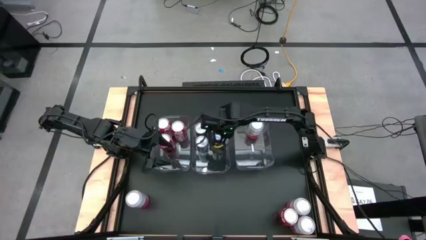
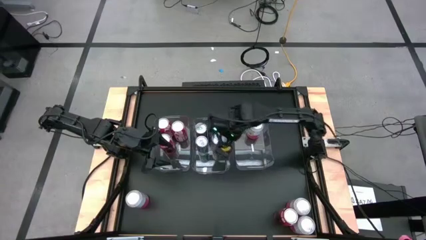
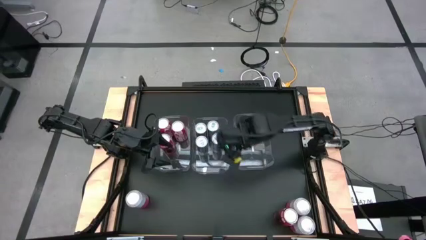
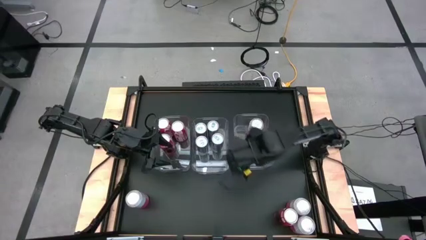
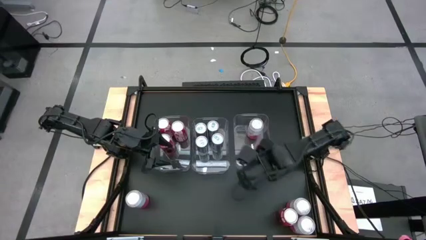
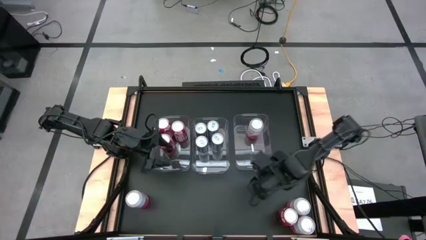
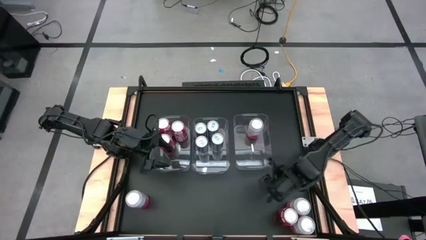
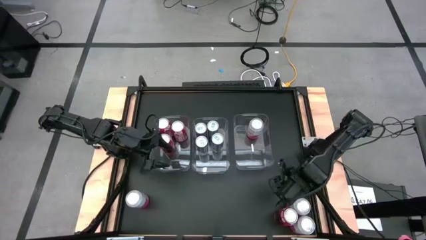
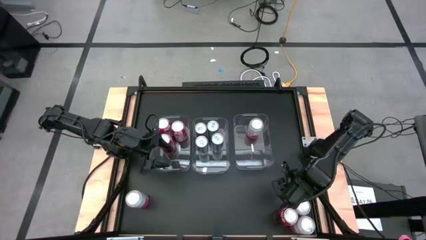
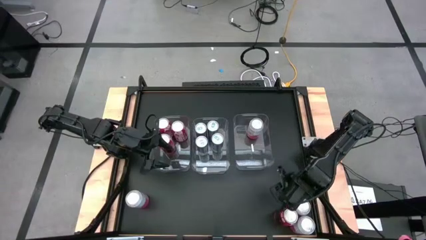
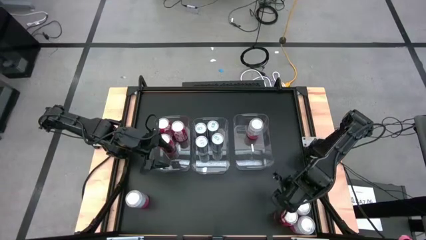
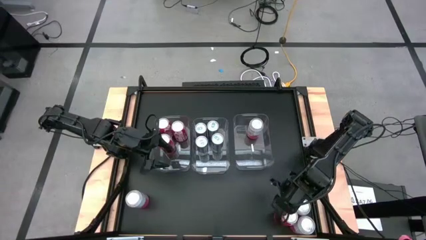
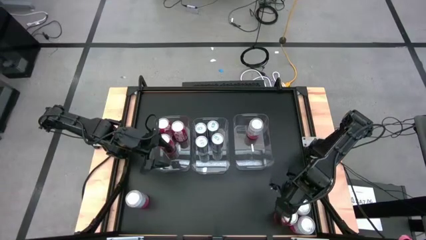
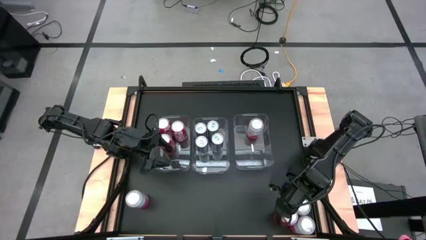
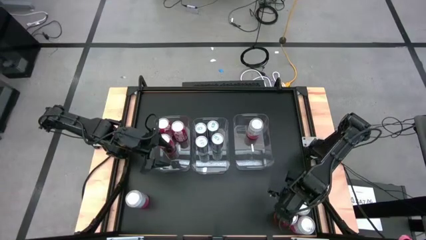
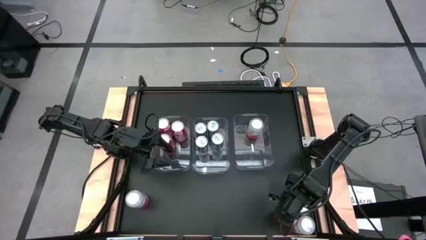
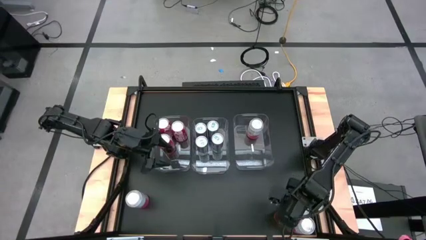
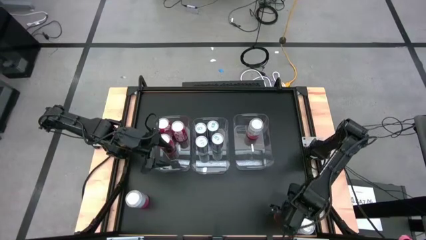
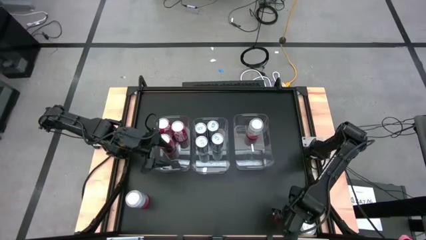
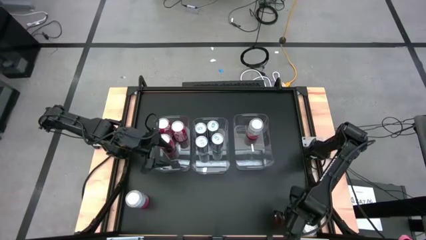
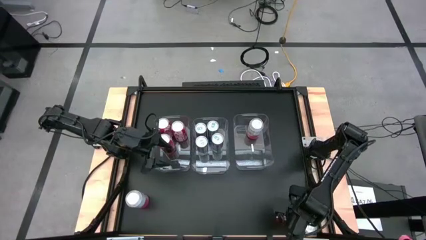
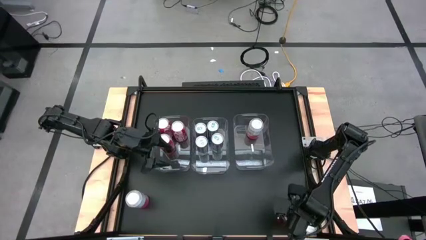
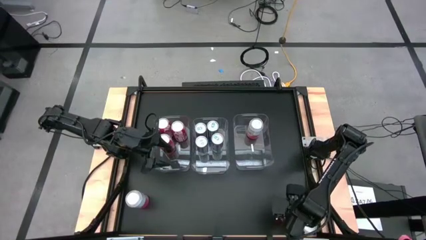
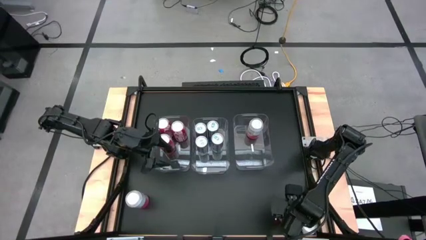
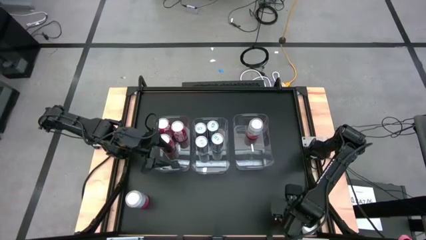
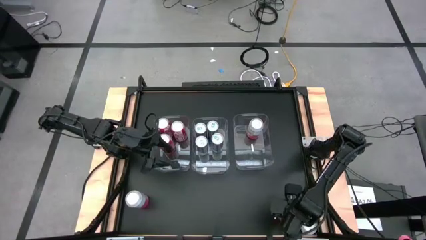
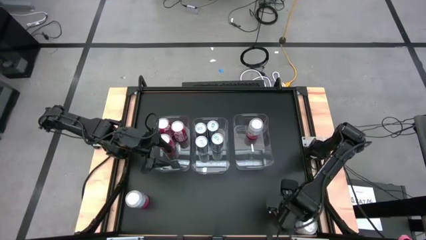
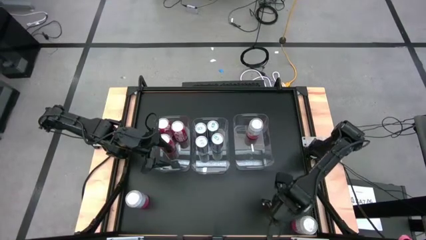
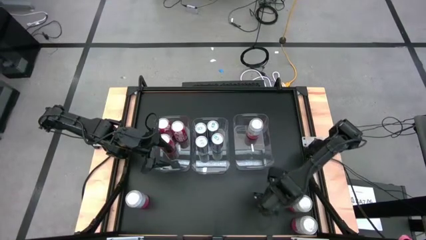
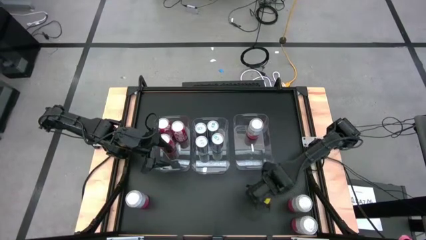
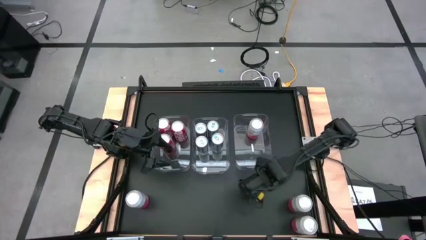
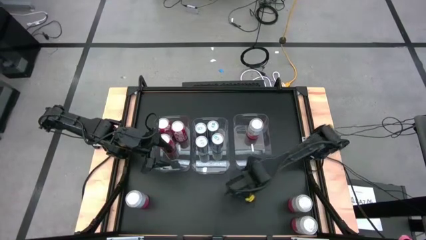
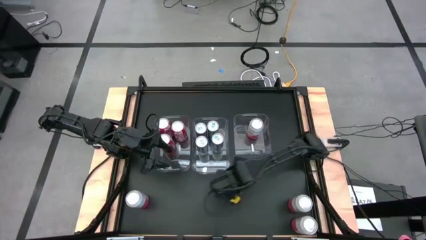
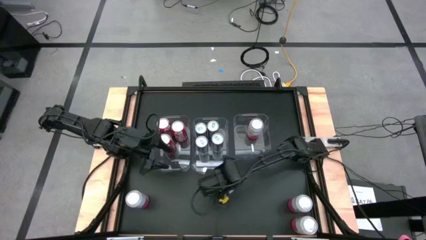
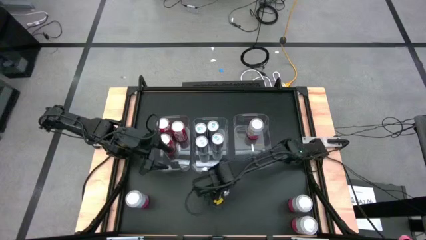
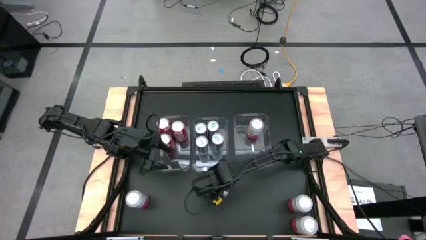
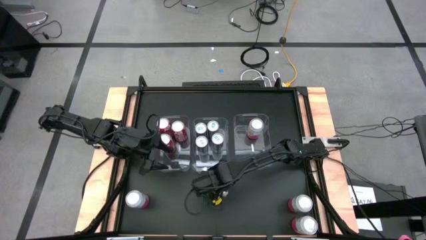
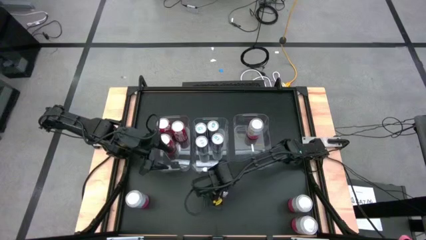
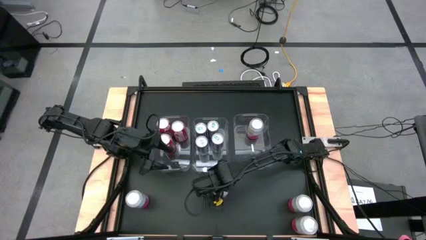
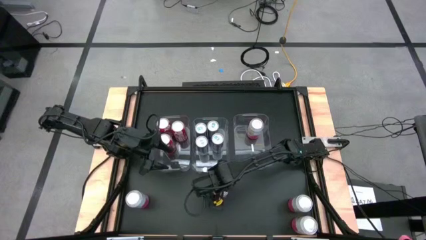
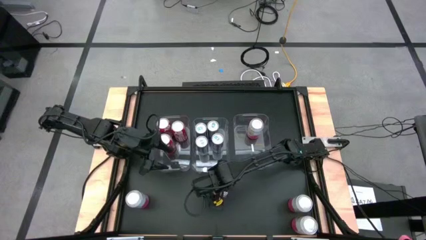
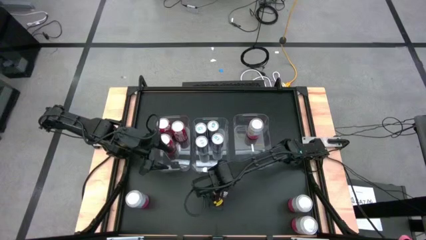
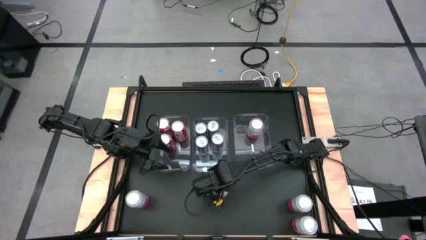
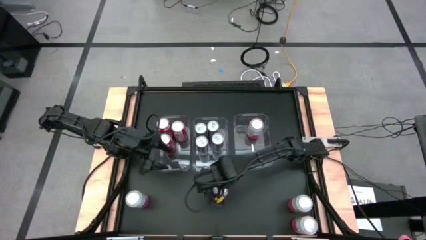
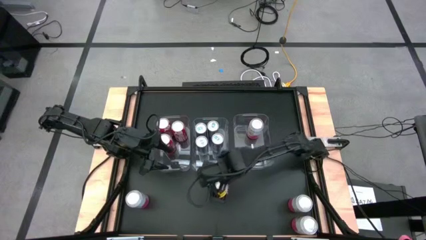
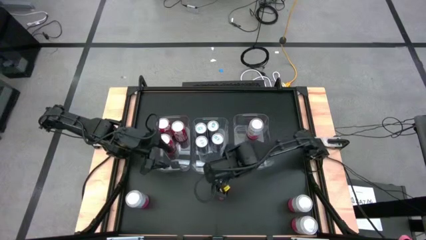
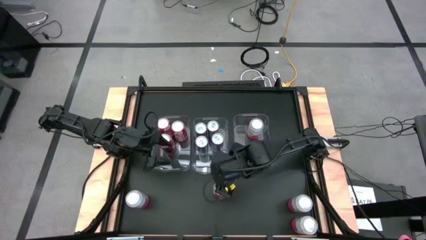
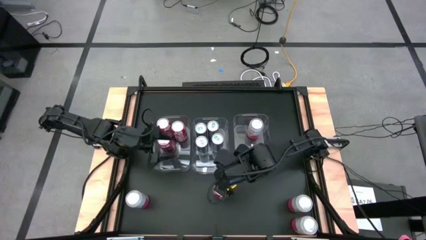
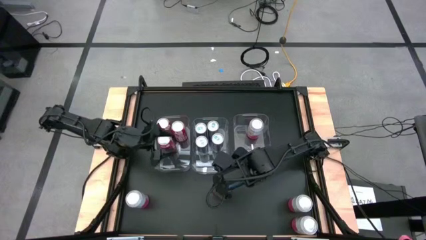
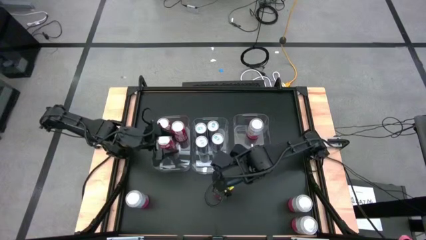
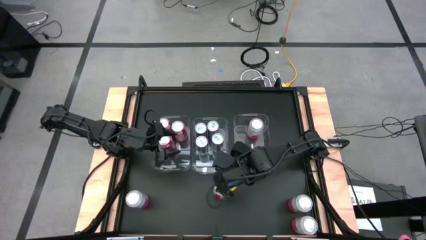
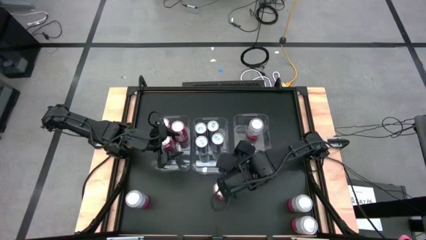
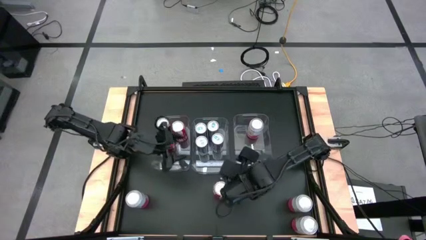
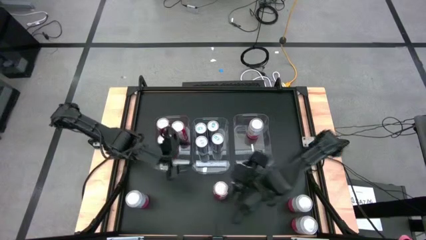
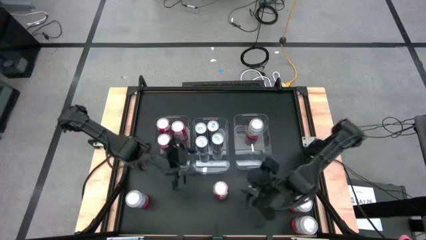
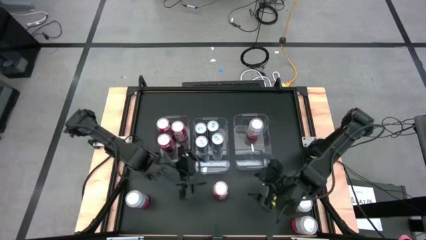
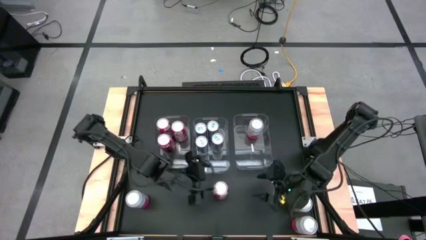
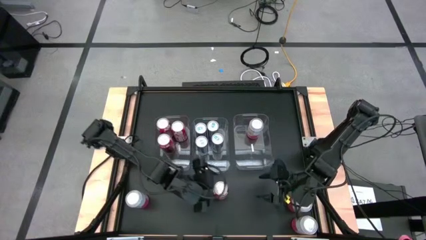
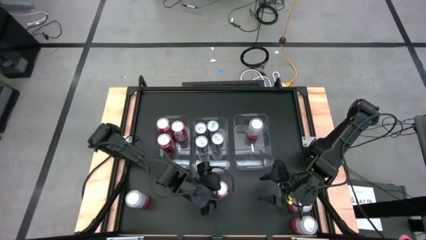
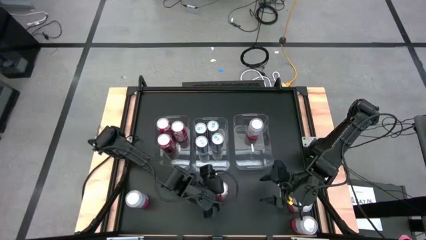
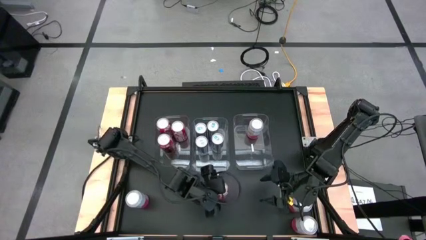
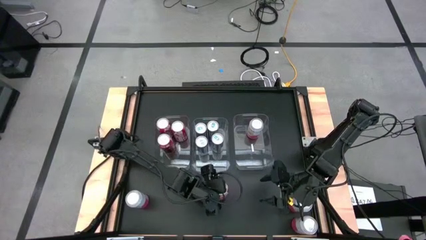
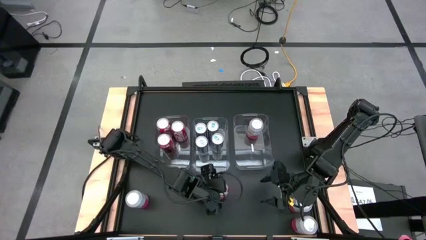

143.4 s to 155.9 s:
Task: Sort soda cans
Put the red soda can into the left transparent bin

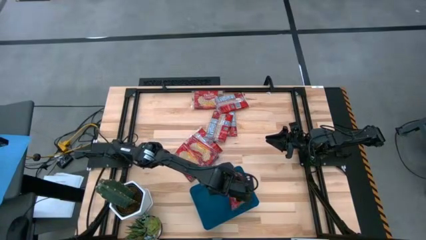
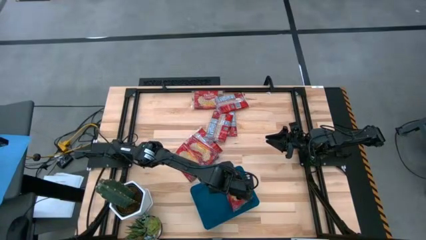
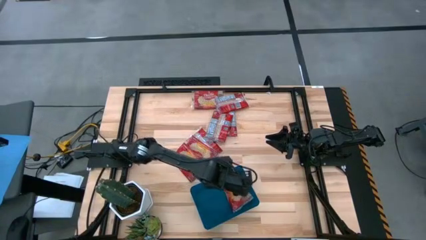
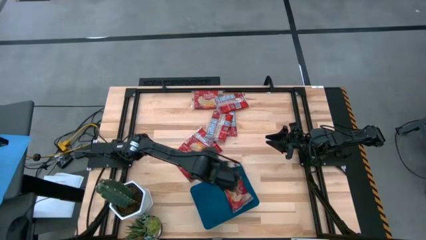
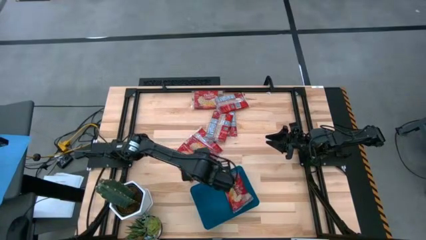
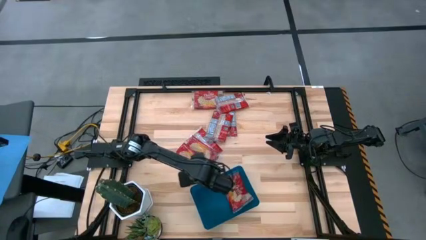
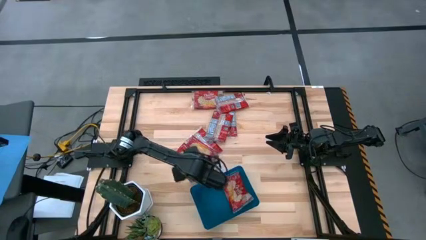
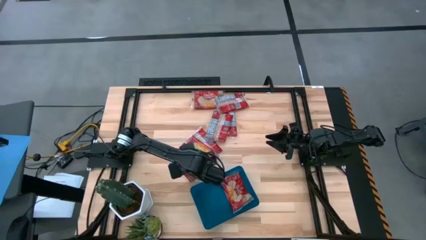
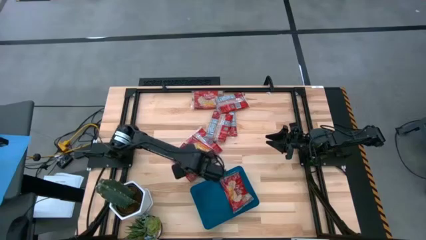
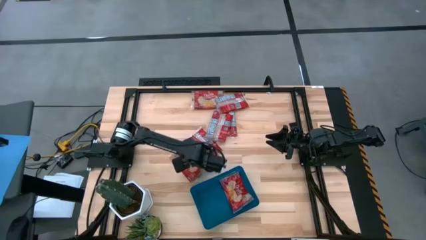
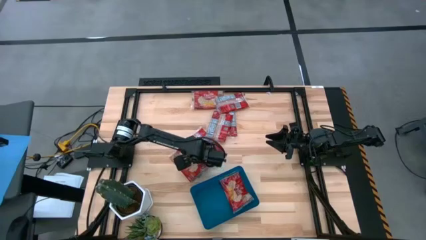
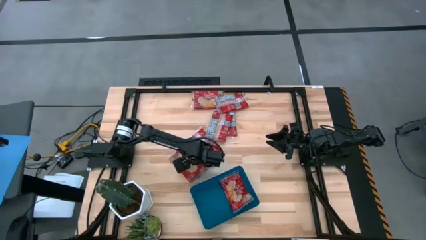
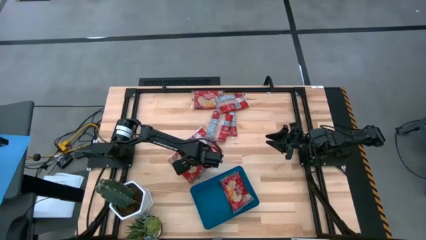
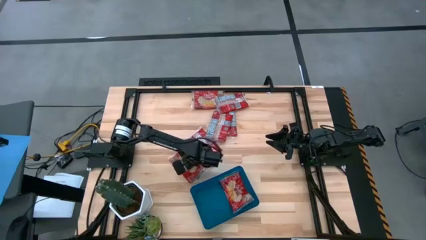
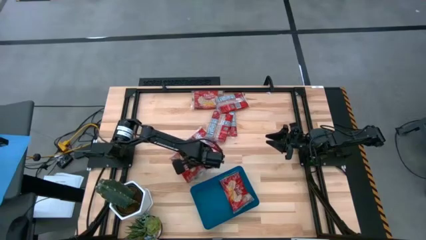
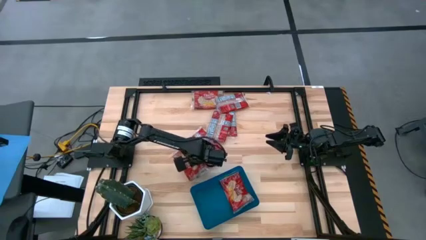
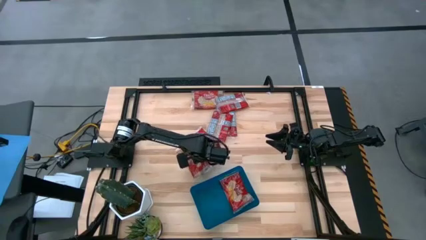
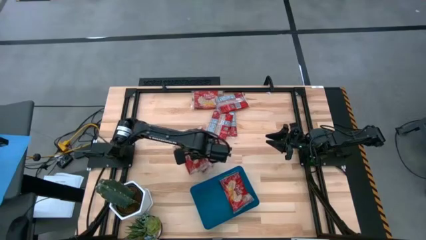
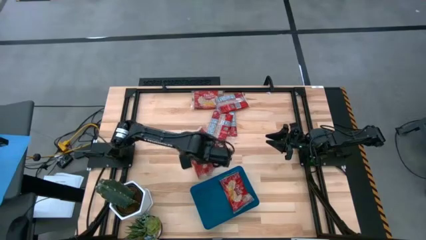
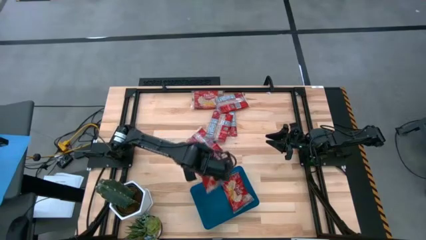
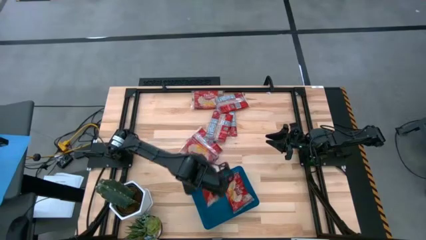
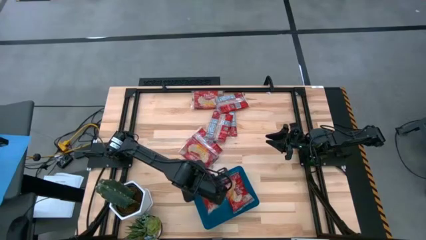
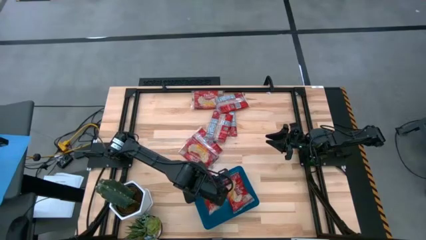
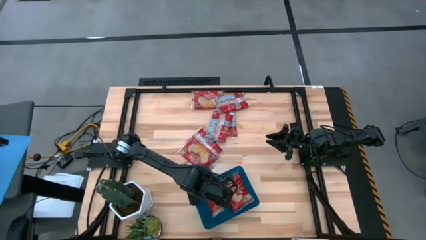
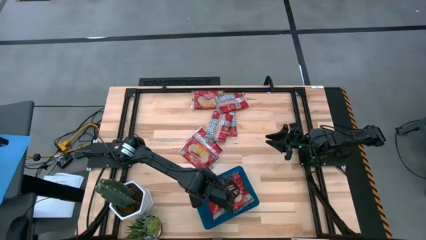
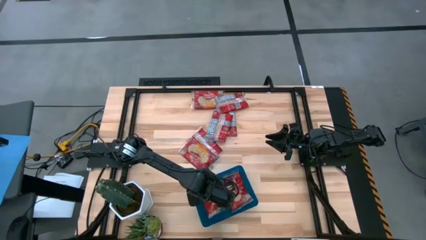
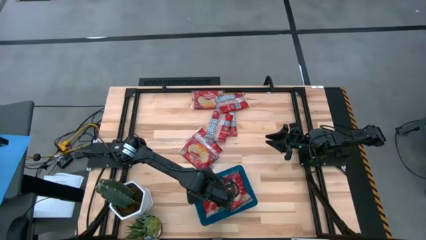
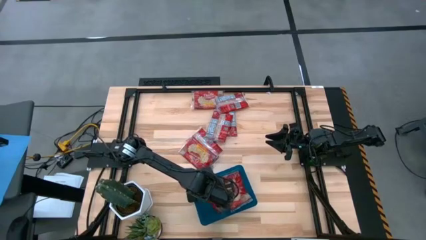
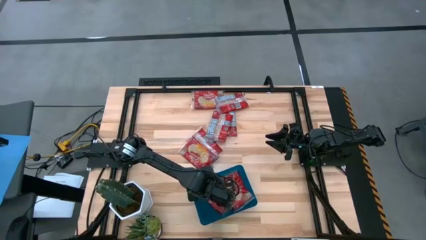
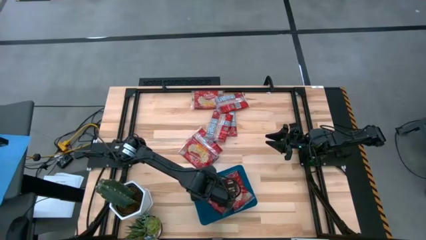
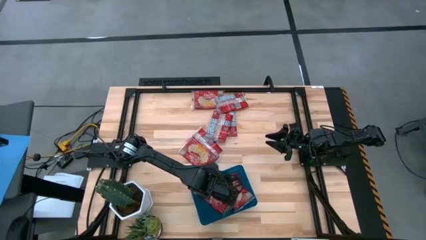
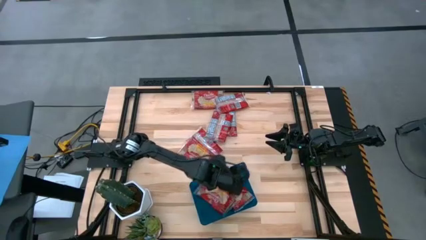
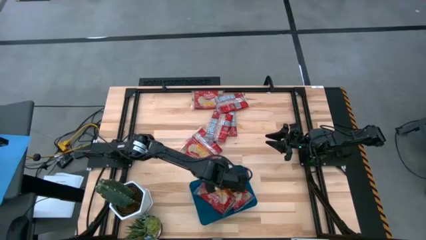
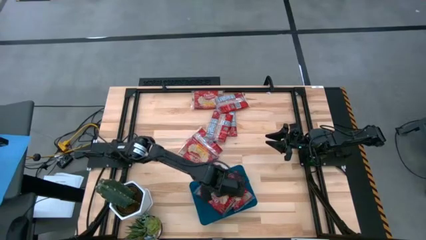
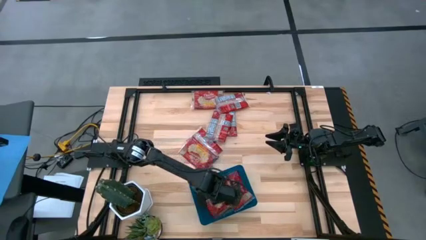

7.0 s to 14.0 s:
Task: Sort popcorn bags into baskets
Put the popcorn bag into the blue bin
